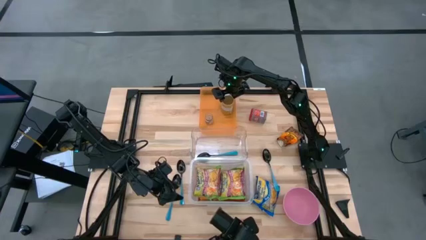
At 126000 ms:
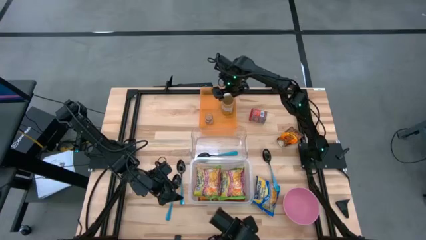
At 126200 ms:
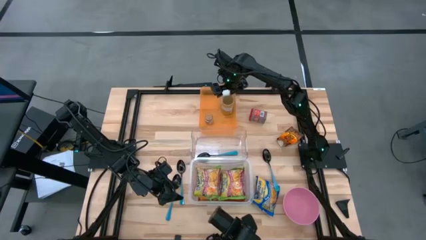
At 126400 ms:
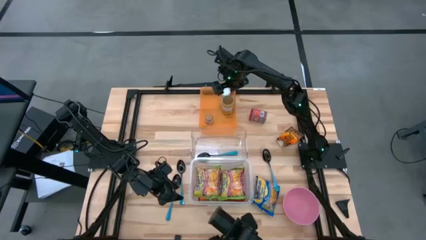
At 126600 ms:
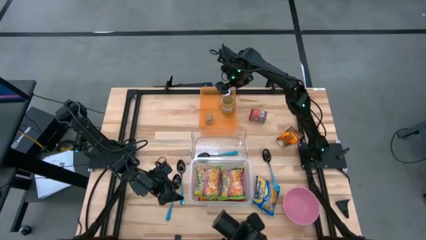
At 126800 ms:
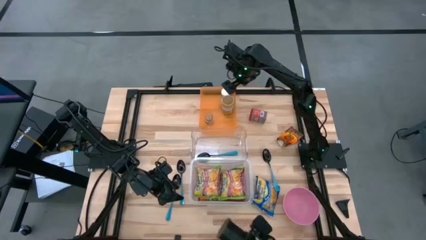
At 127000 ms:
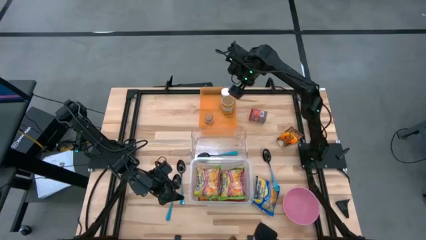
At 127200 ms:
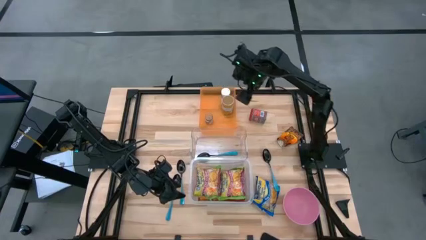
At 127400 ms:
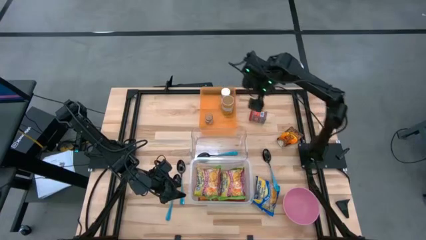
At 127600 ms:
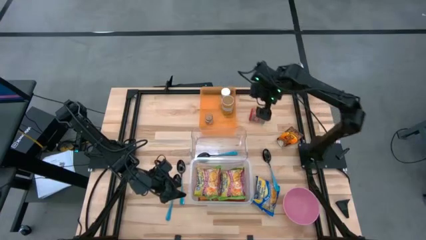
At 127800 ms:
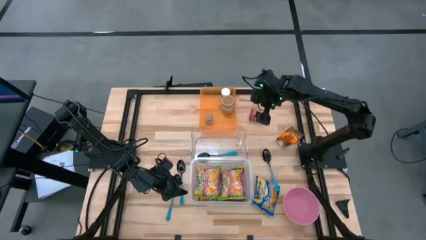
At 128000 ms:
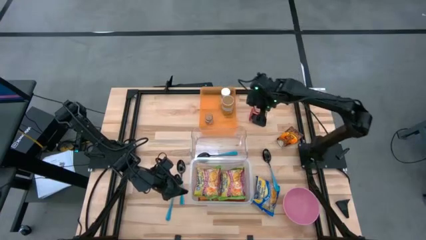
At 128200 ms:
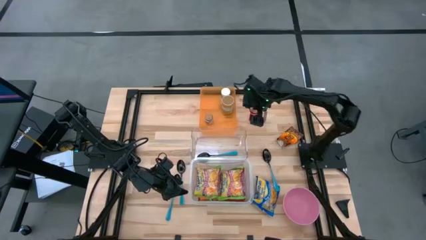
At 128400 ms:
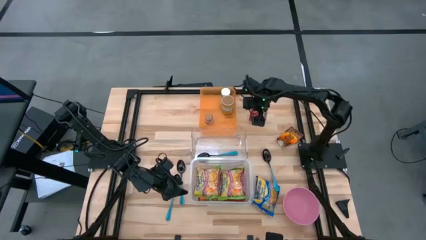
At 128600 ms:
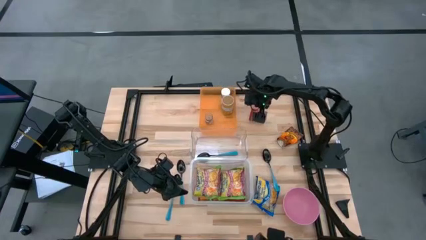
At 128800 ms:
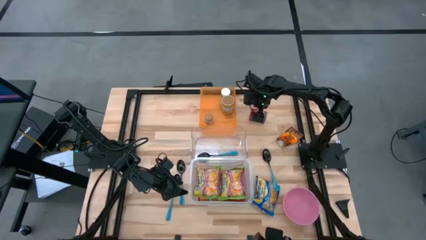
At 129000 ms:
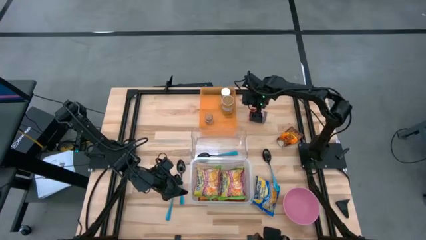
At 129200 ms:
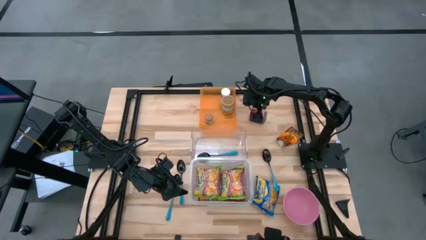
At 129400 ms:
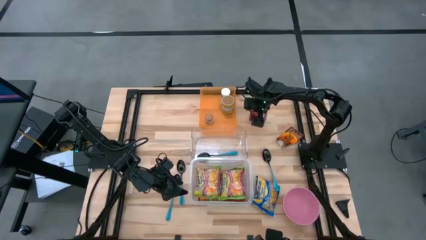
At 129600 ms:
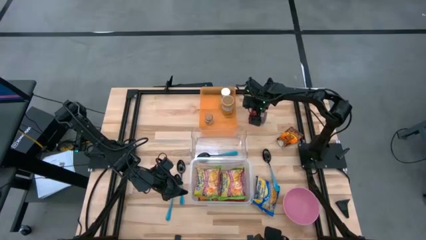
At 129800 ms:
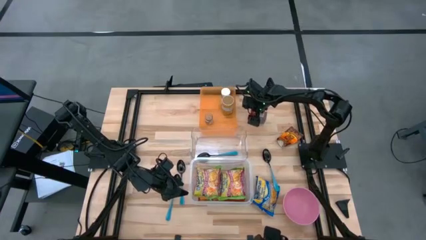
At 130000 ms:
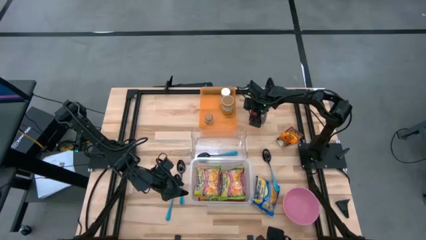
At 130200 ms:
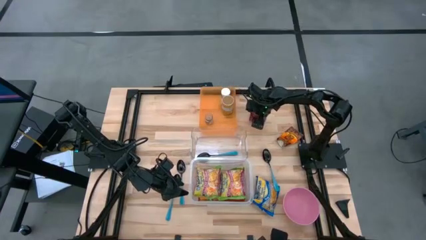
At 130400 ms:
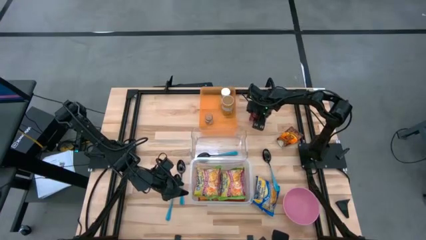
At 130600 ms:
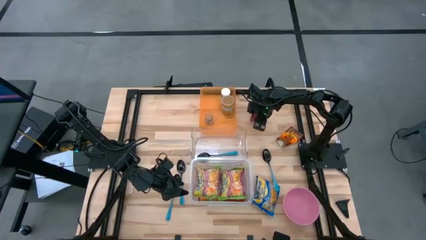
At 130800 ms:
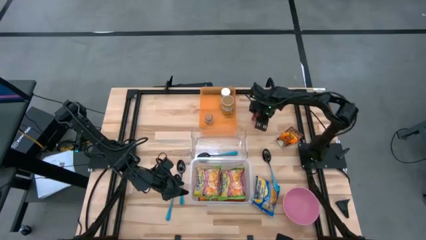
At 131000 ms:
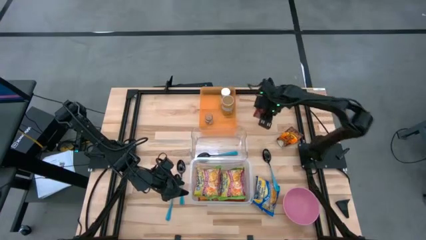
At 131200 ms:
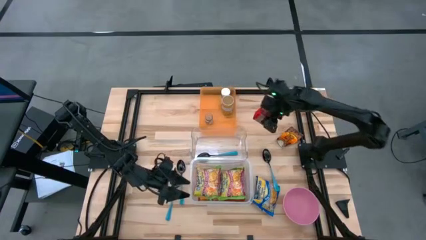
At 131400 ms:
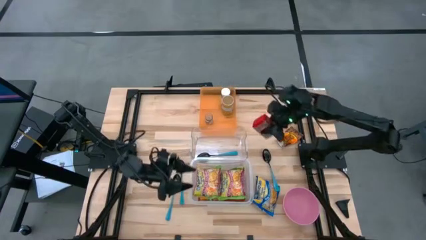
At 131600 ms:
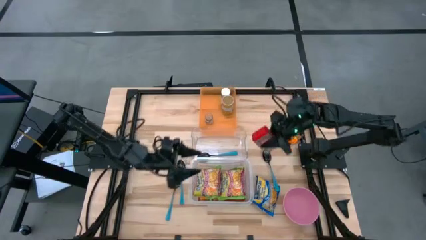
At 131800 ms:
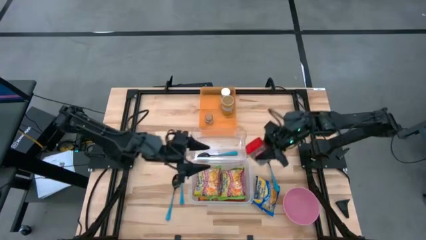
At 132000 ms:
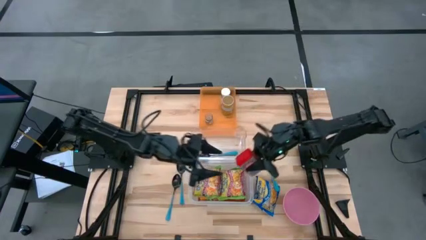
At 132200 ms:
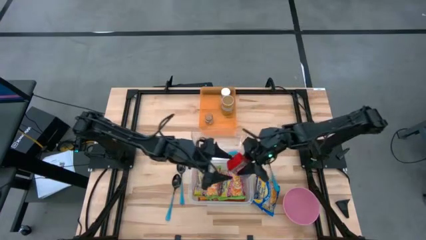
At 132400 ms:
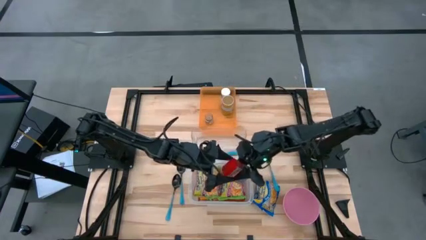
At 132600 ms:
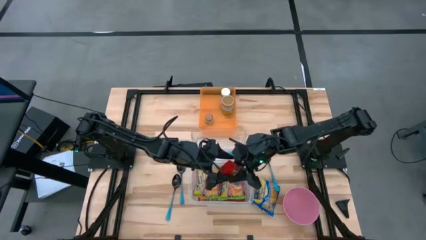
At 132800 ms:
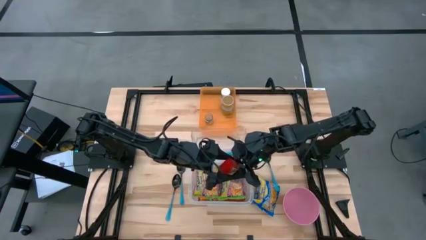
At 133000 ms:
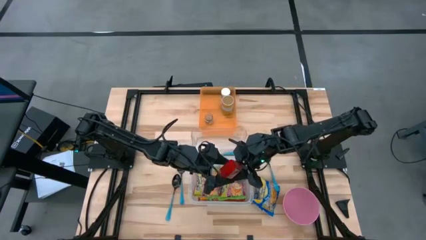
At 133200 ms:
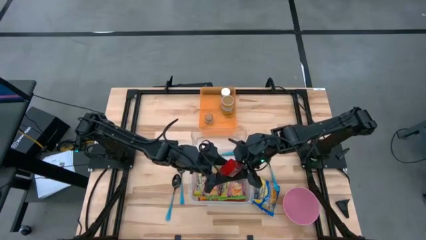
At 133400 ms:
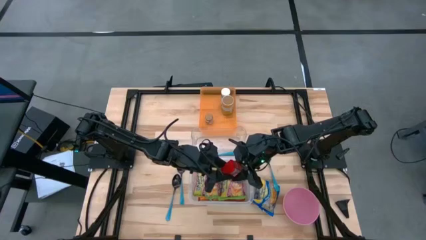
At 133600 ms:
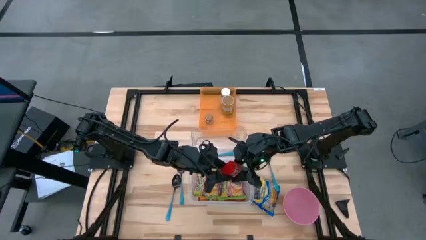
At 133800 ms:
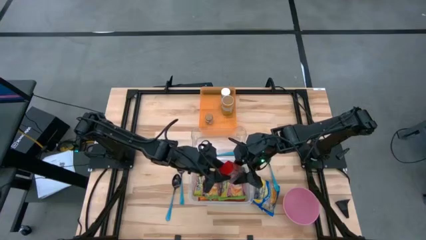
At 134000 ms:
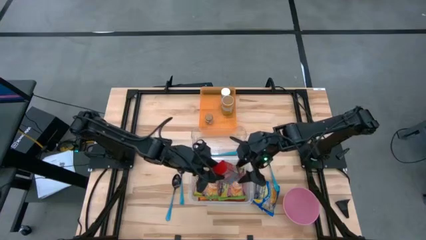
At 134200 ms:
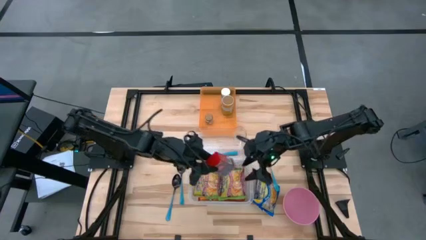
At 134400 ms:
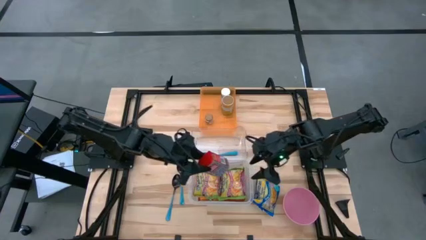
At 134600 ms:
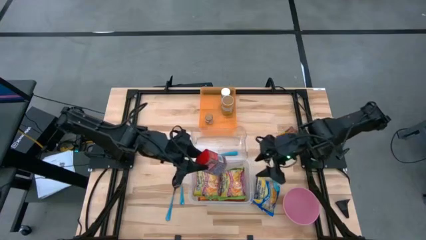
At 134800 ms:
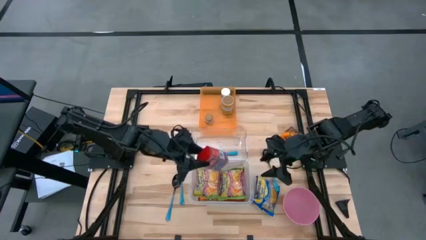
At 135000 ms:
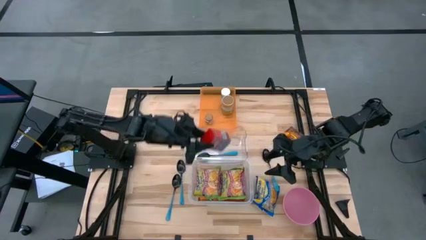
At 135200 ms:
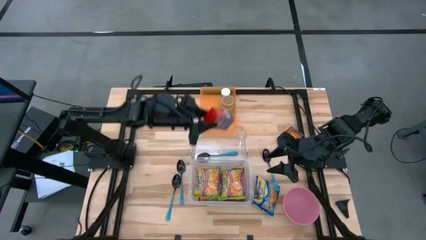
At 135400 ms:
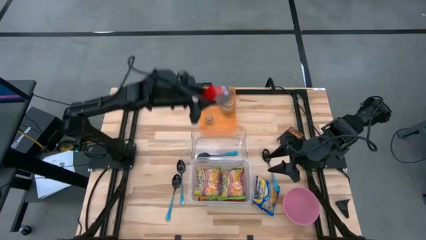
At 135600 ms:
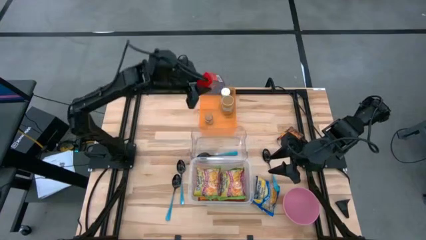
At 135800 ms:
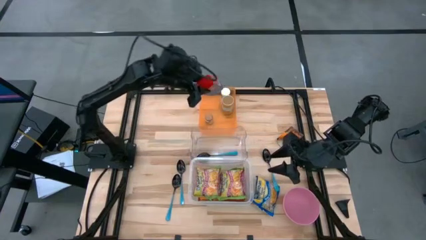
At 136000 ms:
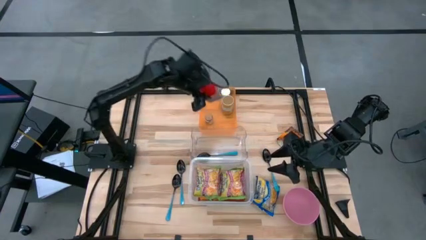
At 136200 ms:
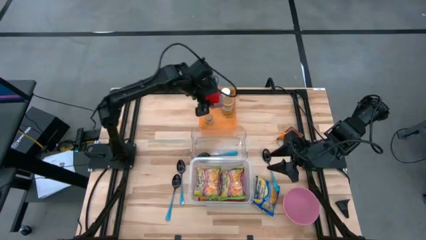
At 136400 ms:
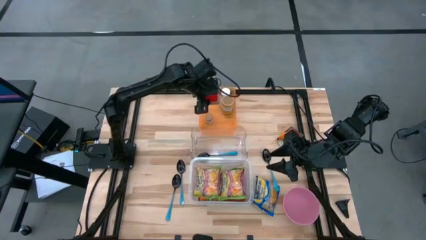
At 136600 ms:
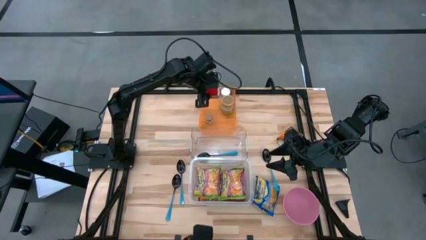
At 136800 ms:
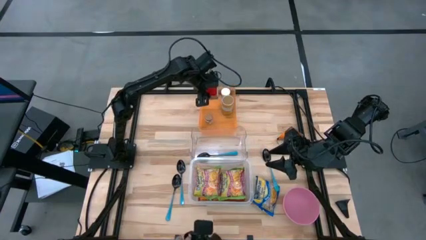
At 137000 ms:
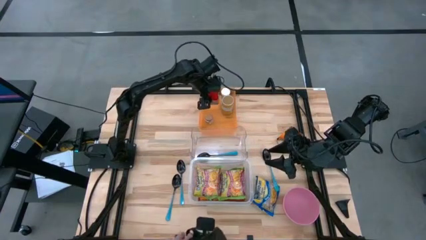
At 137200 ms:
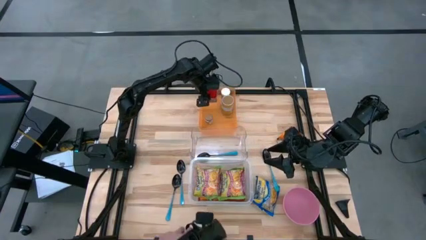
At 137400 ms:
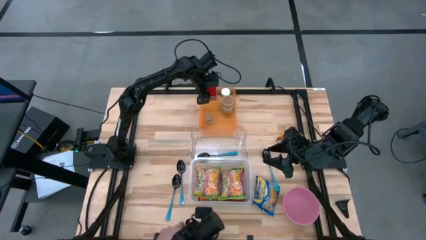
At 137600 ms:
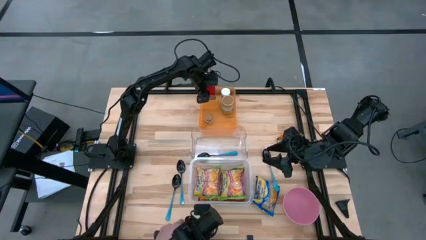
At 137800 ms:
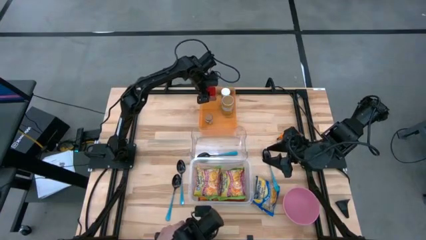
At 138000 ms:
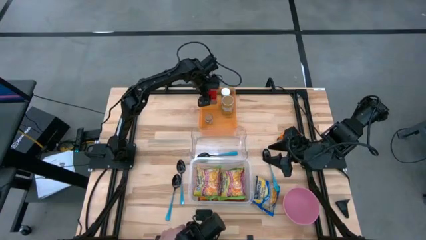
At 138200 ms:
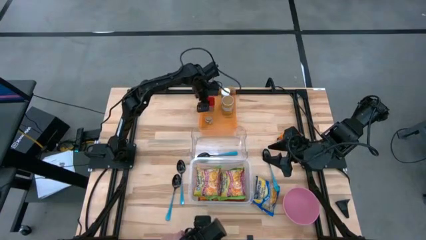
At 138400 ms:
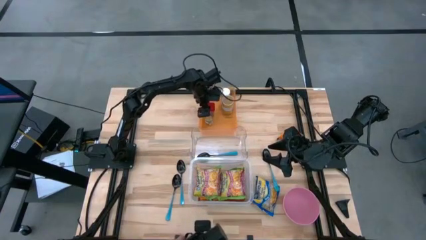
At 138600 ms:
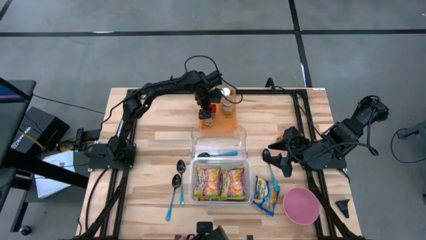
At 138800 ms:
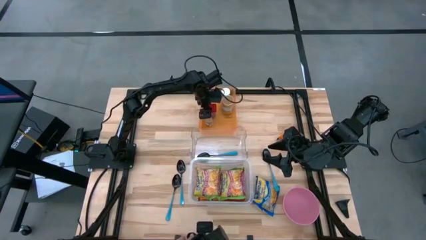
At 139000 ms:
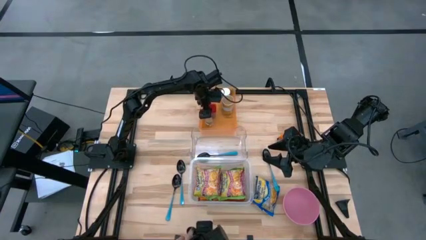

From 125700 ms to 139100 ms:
Task: Pick & Place Food Item
Put the red seasoning can into the orange transparent bin

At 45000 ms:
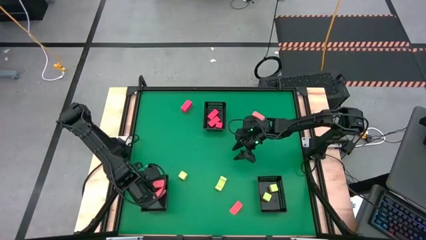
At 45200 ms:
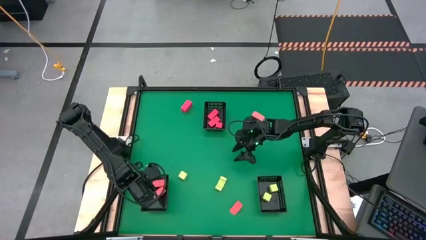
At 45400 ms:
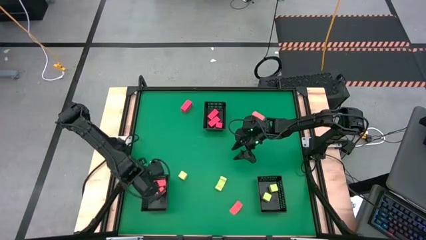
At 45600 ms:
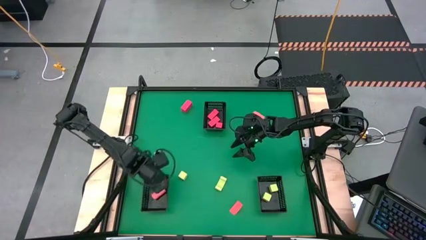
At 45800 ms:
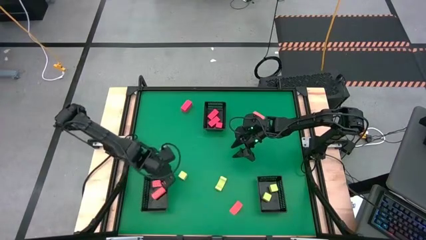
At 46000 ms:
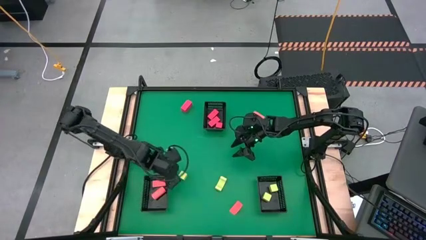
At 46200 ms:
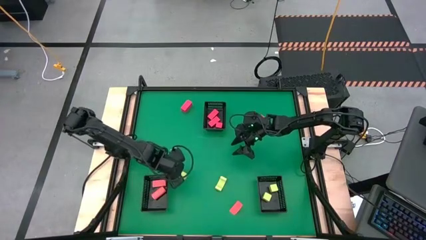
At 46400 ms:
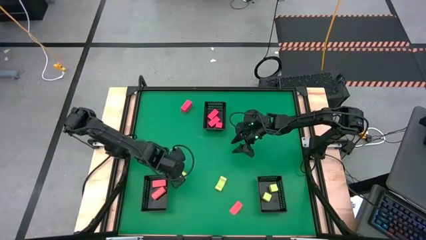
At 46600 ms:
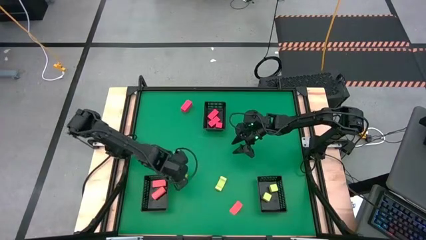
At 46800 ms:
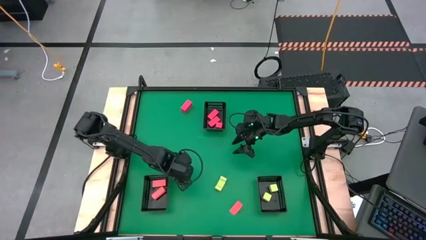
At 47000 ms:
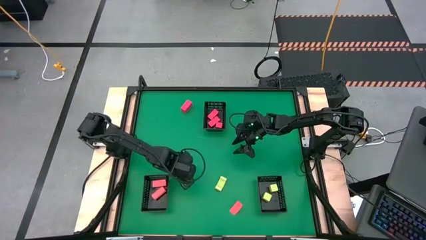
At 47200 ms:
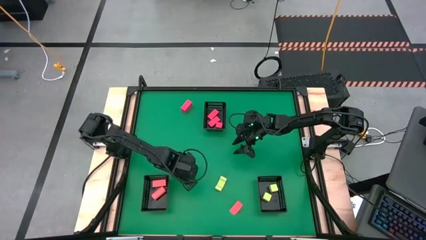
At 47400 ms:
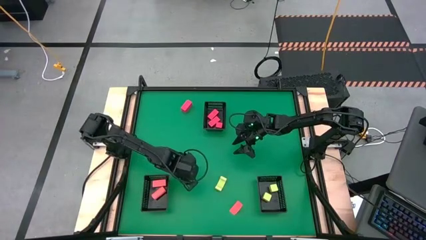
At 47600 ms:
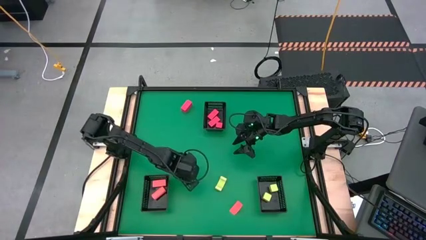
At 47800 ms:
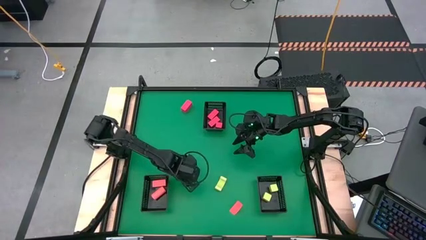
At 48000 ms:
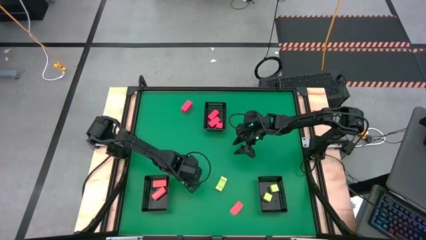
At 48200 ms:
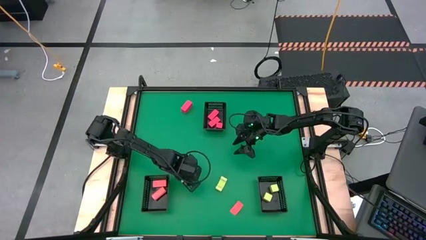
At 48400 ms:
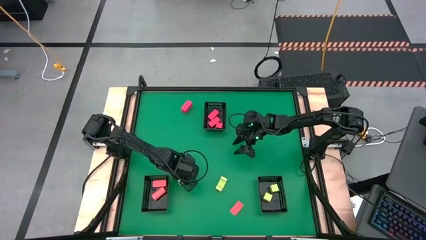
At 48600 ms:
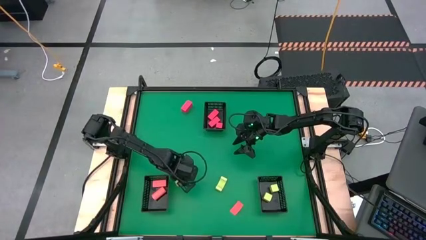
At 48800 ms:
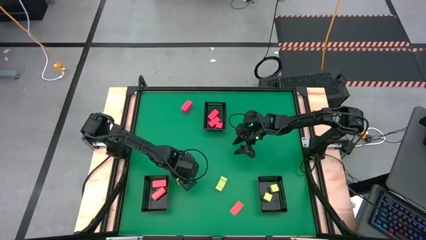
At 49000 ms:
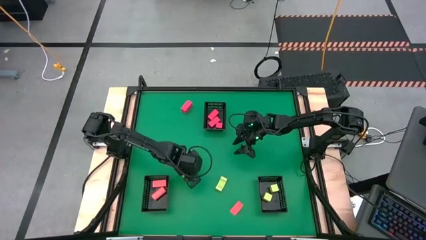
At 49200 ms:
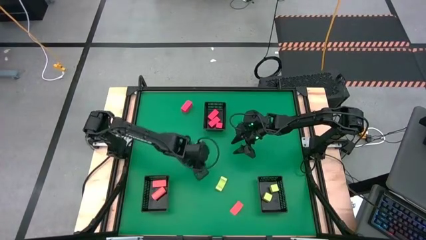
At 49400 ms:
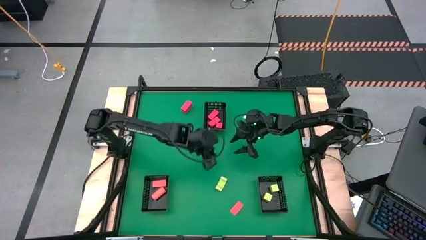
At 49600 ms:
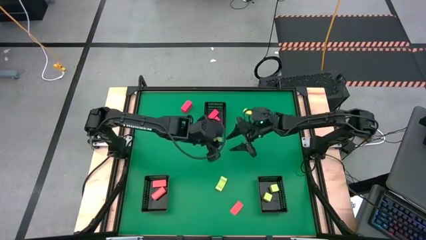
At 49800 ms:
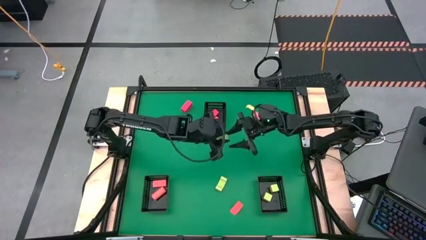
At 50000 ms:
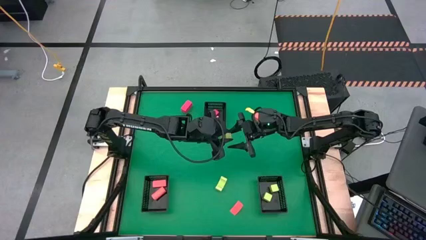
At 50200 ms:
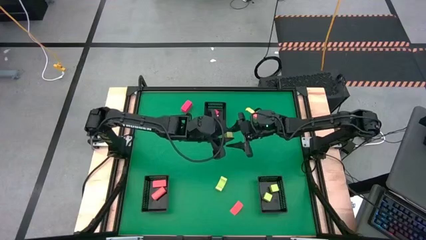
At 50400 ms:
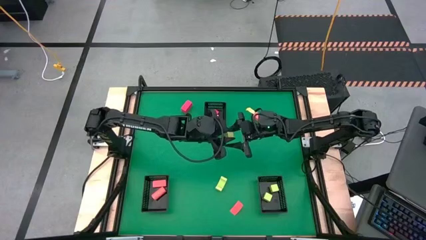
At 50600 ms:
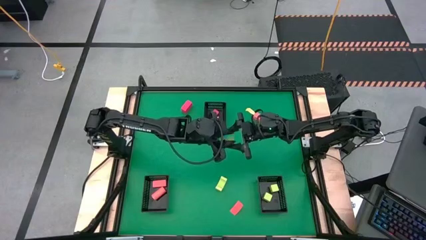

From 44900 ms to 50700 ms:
Task: Sort & place blocks by color
Put the green block into the bottom right black bin
